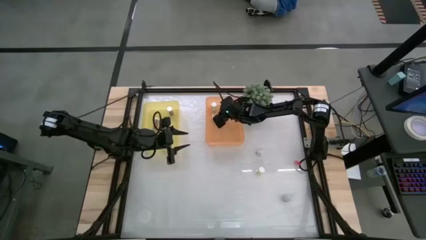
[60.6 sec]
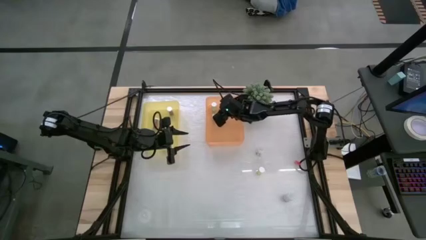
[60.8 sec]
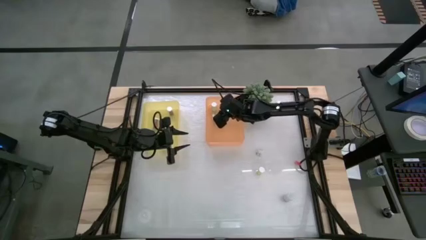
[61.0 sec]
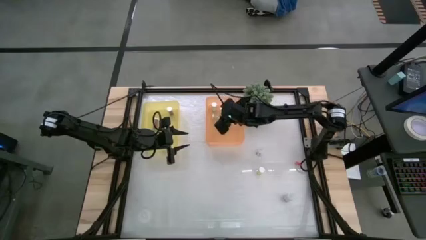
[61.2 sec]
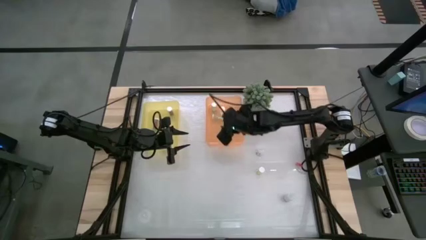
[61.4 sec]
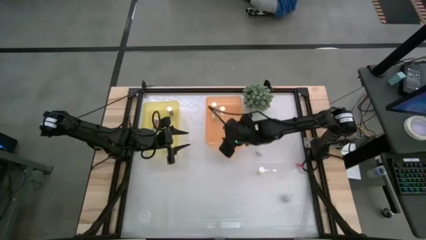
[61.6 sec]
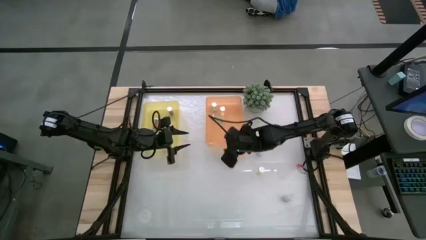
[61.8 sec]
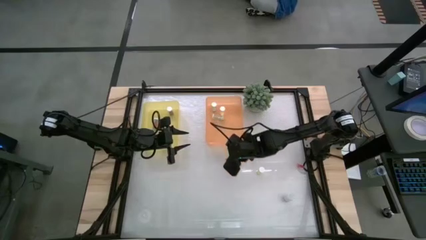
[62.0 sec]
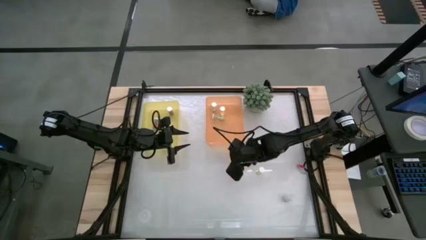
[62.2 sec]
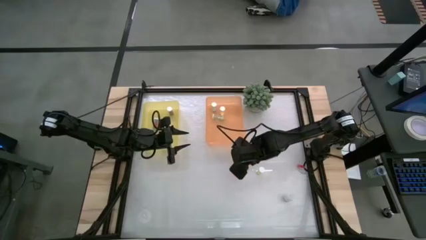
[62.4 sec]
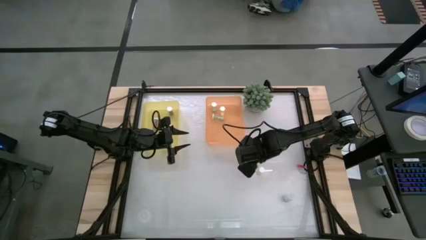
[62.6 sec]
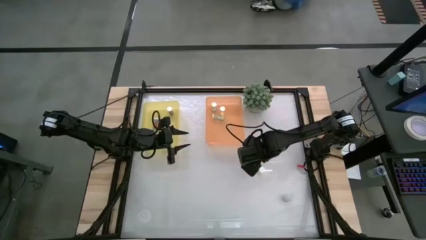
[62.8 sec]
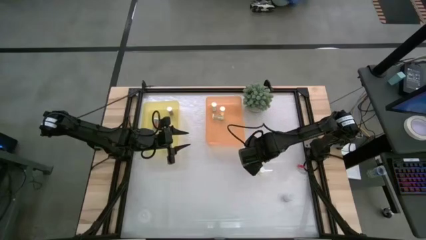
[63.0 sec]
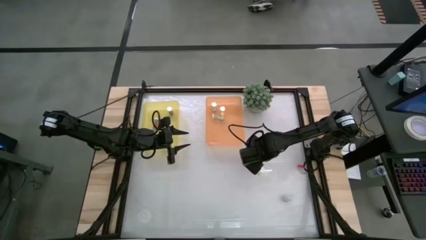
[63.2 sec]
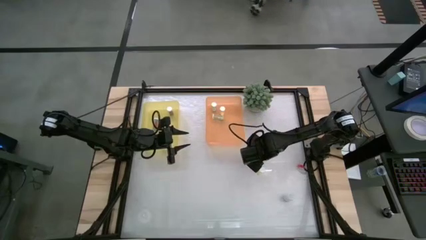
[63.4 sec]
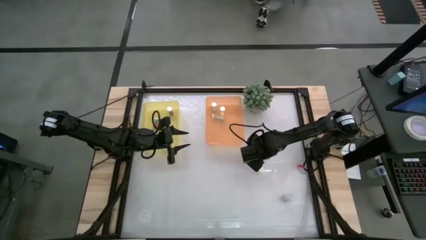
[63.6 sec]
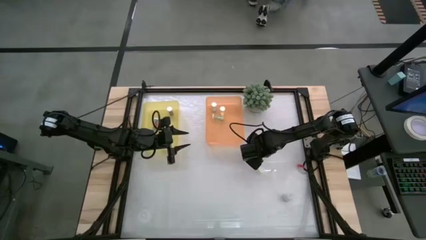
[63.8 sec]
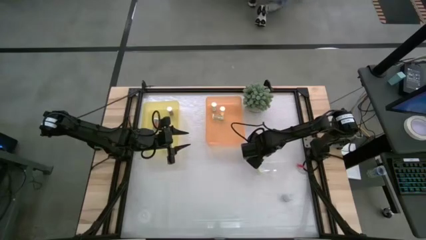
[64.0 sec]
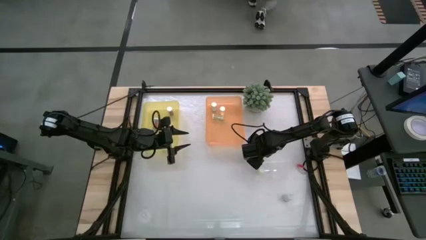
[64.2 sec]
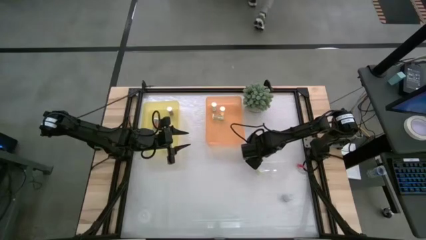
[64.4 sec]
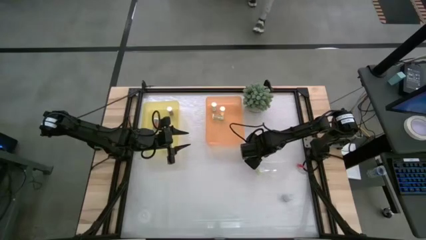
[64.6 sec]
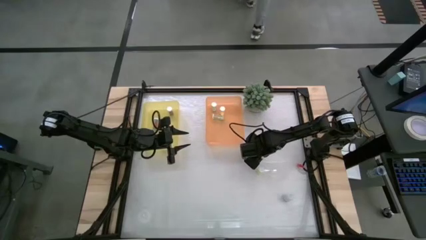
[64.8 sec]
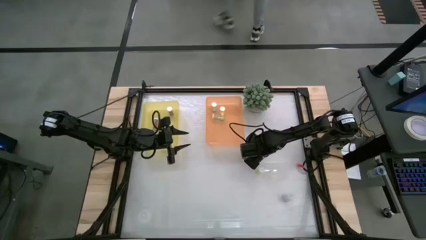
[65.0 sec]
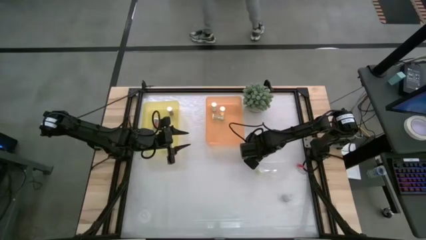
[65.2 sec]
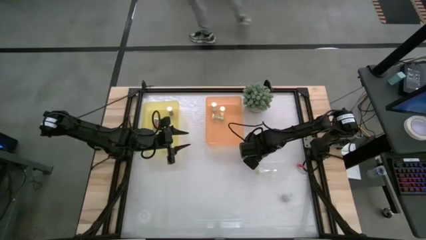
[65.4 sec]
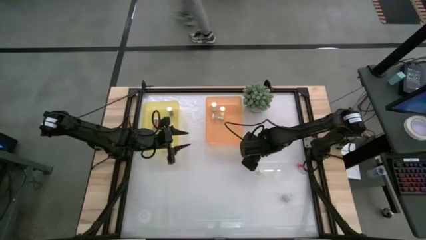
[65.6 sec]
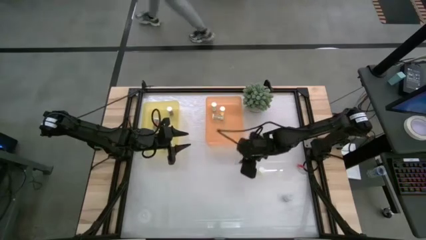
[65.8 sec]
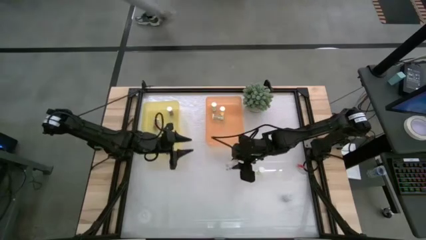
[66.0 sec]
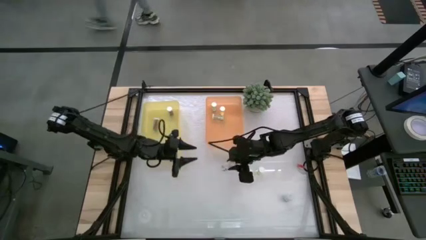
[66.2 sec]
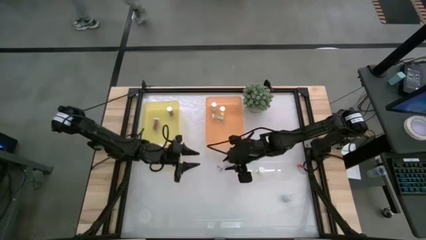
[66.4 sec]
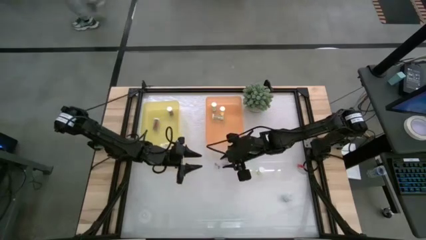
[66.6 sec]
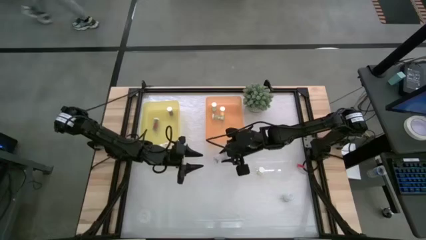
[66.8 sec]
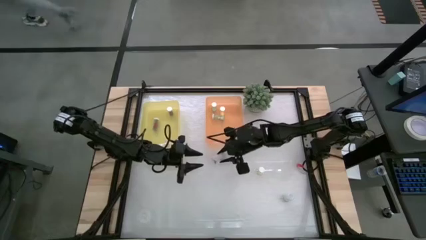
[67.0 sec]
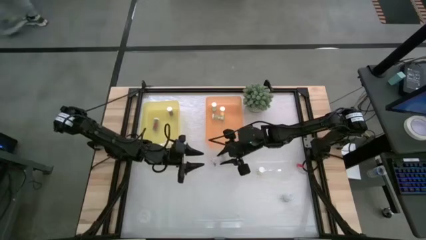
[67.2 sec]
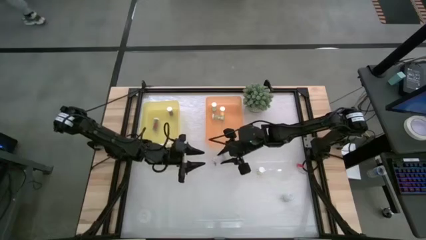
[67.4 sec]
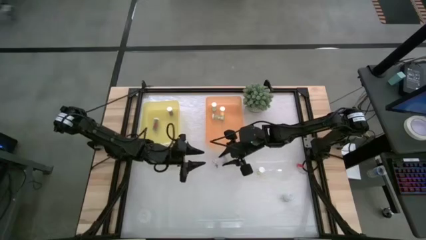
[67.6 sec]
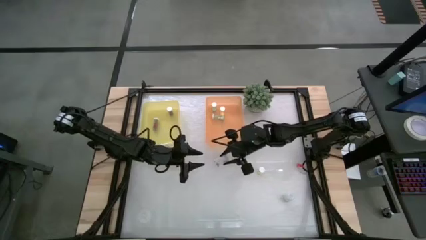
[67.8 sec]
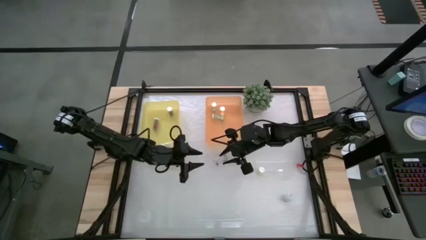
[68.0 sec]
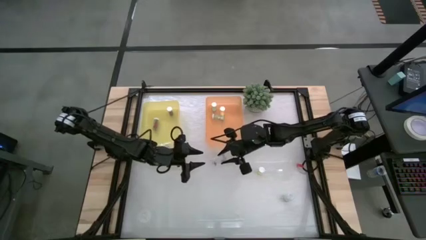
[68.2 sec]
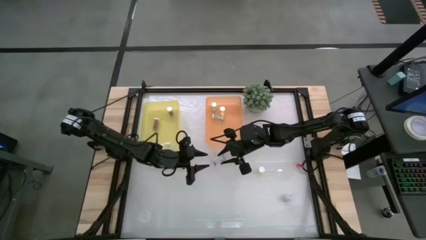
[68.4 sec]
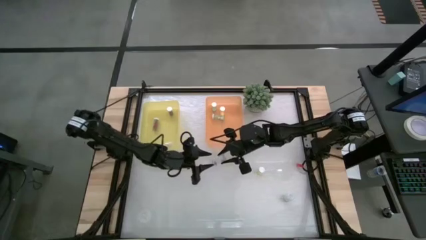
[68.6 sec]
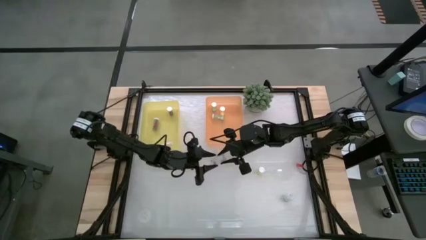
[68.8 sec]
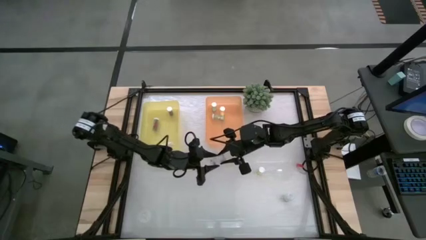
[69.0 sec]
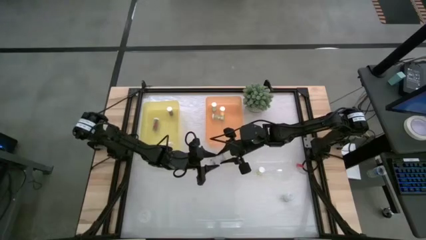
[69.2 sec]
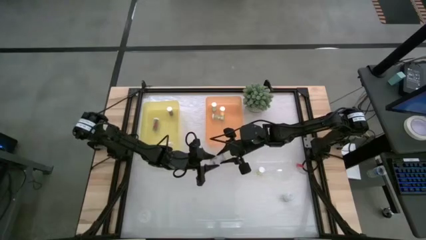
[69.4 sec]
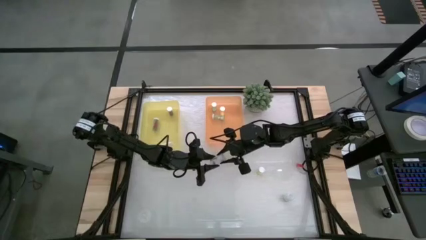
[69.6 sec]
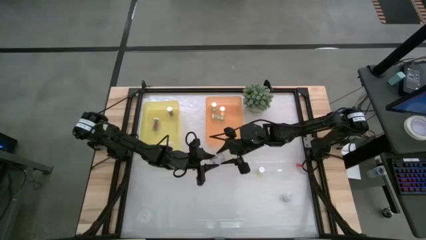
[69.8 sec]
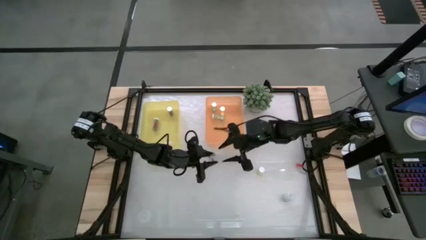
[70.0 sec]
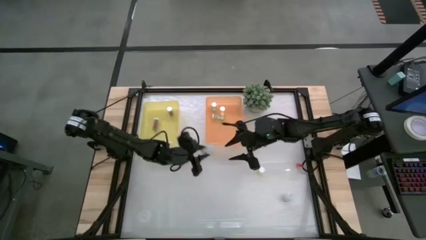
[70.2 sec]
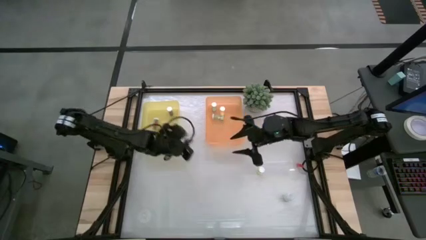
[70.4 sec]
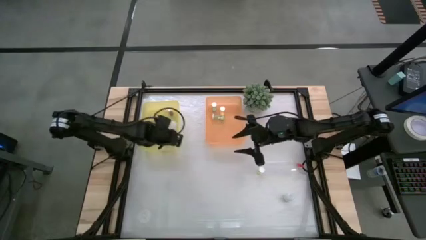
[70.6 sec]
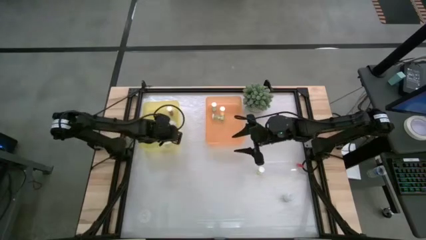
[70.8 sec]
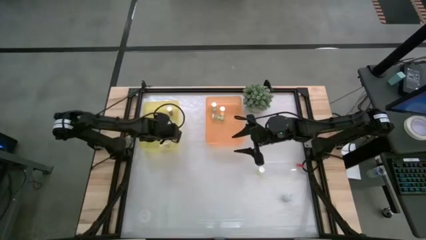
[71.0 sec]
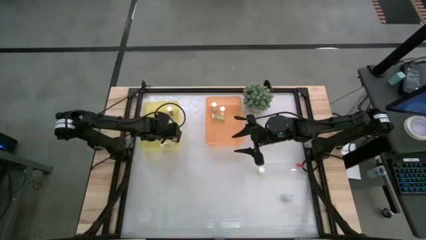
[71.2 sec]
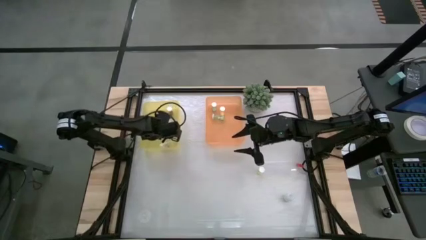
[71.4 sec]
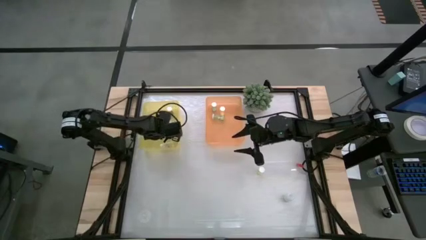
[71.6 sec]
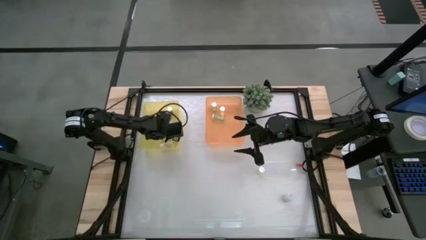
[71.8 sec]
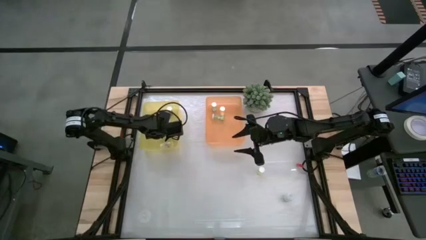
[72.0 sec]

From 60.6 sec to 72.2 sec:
Task: Pick and place medicine bottles into bin by pill shape (circle, oval)
Put the transparent capsule bottle into the yellow bin

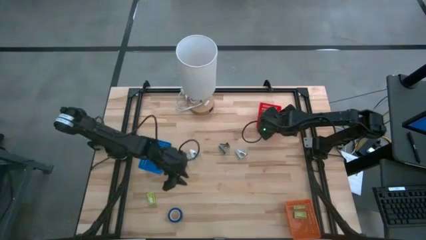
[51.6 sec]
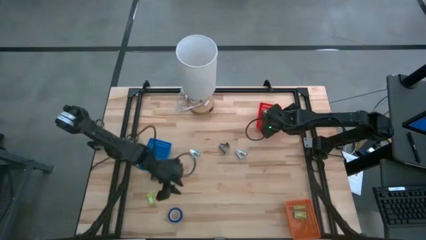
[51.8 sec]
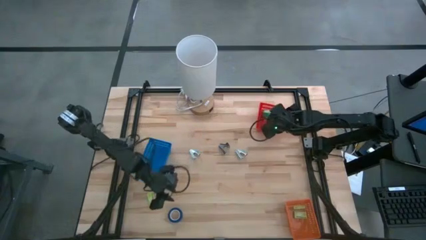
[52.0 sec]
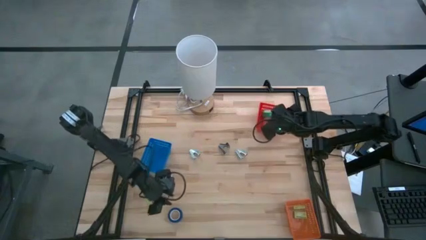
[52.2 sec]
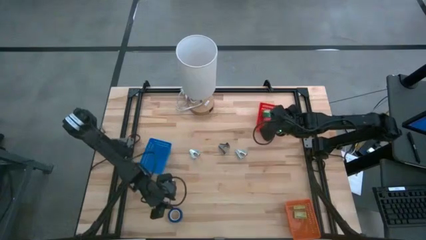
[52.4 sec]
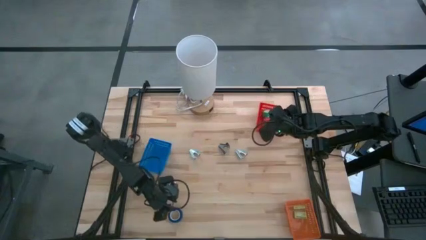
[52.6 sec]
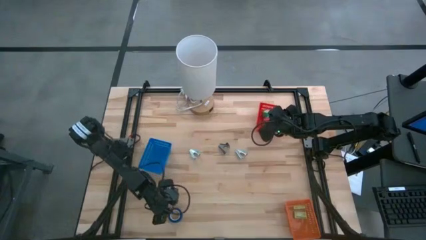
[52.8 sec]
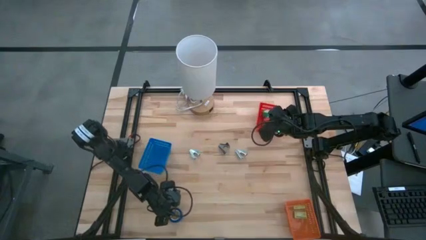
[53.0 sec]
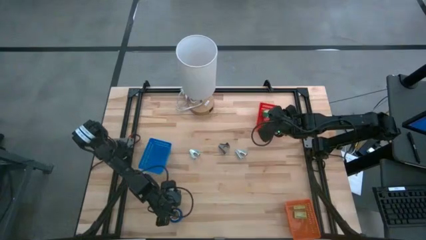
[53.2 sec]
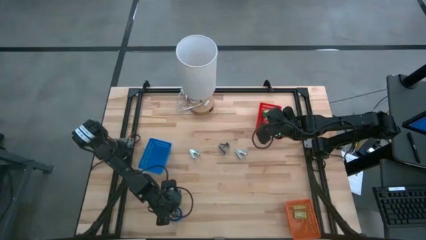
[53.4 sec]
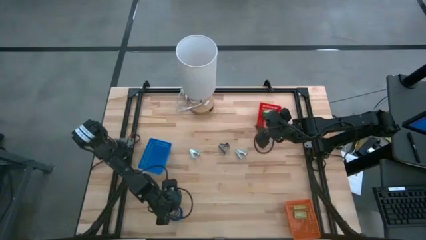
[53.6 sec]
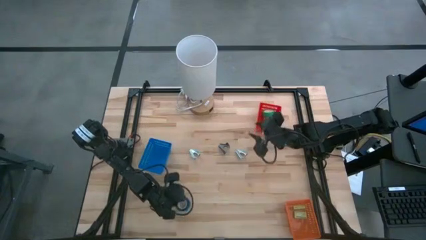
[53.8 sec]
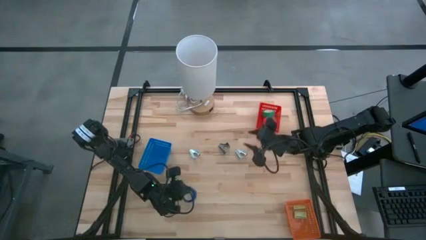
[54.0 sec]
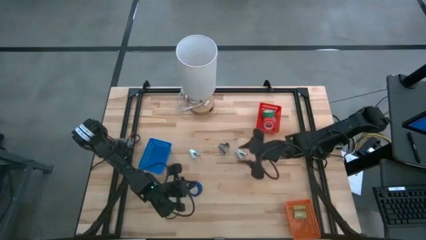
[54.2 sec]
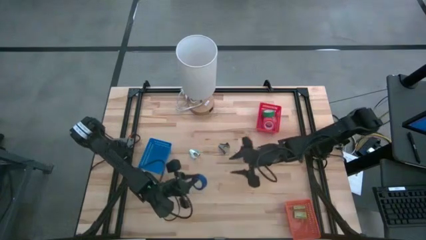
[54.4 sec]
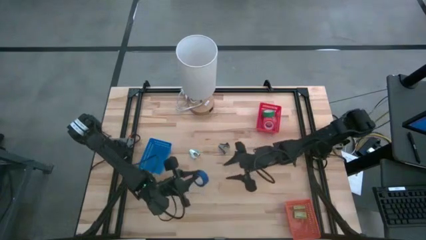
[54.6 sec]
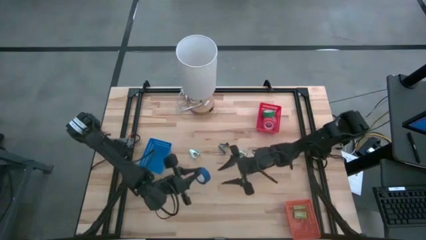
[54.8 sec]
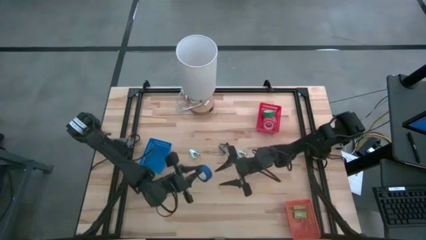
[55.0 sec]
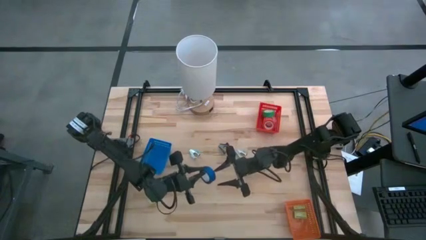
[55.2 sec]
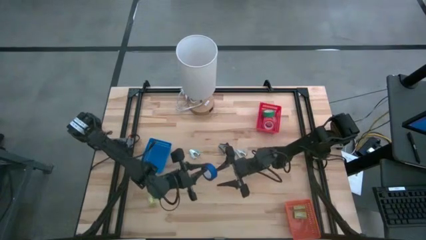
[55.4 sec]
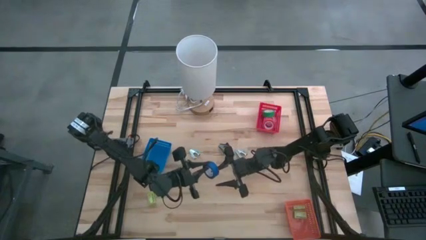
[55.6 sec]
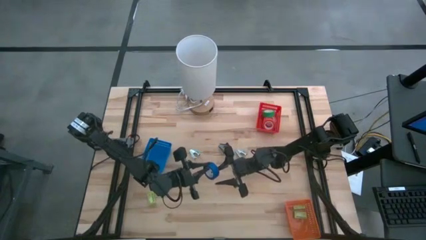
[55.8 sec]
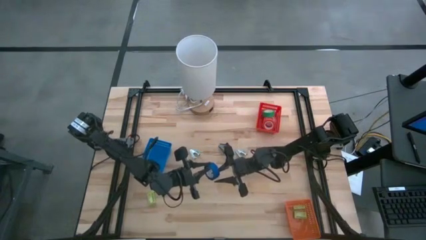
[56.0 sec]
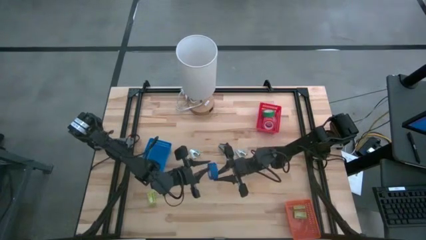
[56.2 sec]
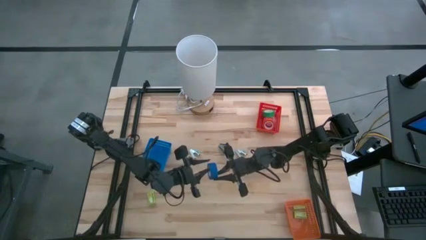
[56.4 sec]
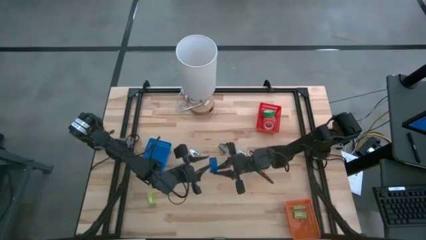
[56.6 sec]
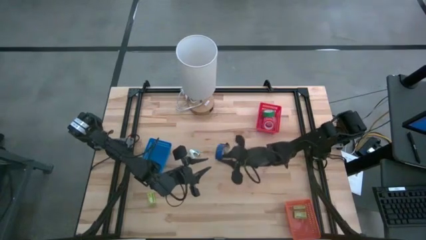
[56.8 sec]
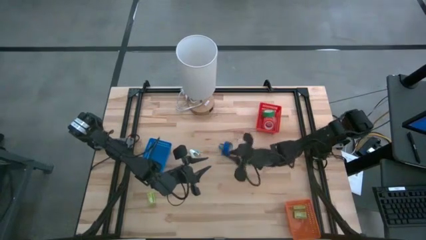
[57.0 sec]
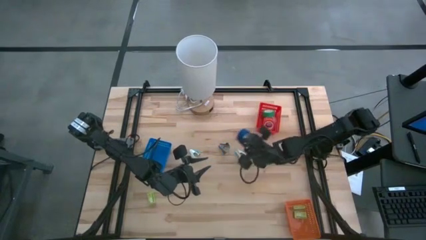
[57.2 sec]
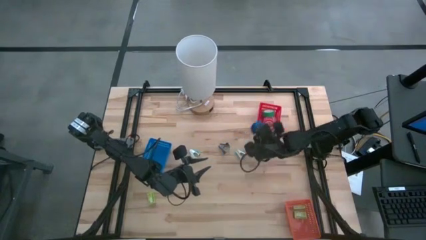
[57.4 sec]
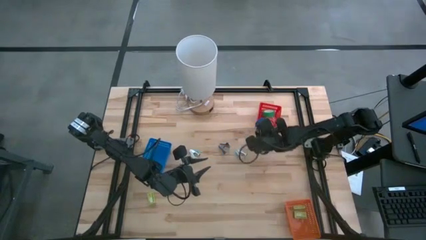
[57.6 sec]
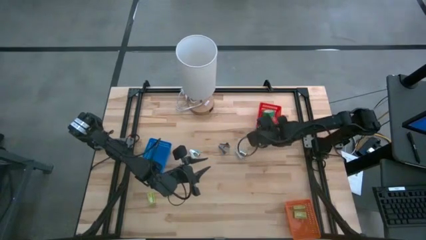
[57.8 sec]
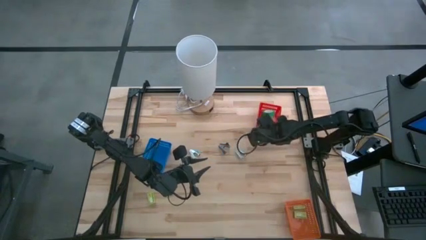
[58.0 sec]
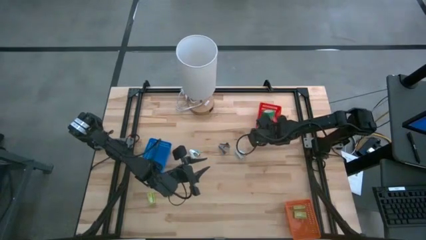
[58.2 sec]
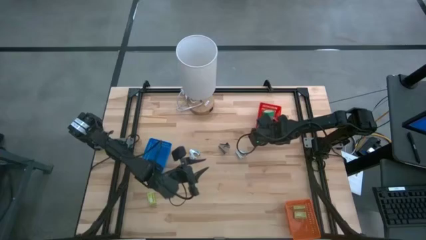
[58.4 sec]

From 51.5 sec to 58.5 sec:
Task: Pick and place Stapler, Stapler remover, tape
Put the blue tape into the red bin
